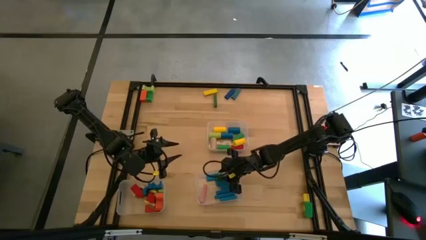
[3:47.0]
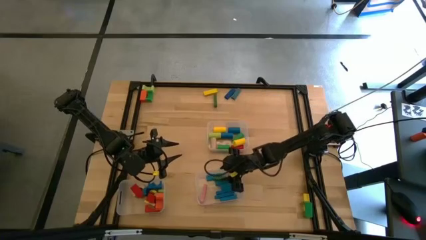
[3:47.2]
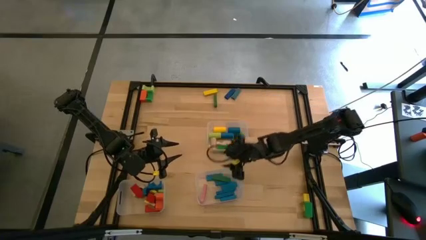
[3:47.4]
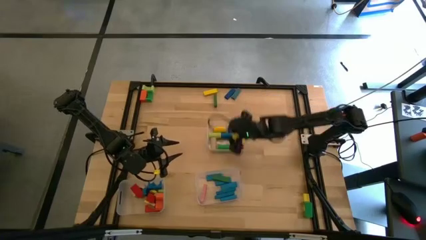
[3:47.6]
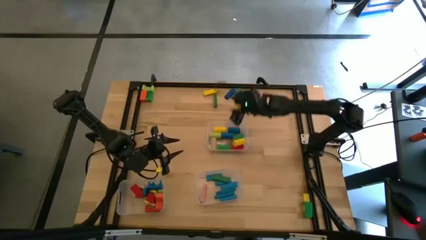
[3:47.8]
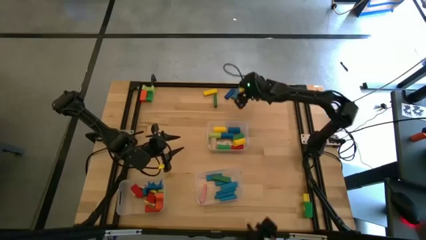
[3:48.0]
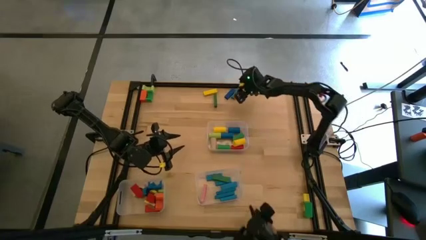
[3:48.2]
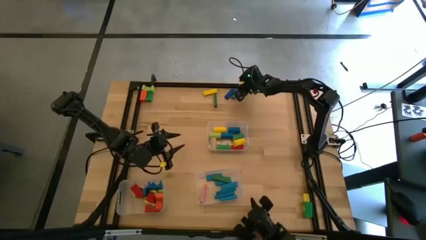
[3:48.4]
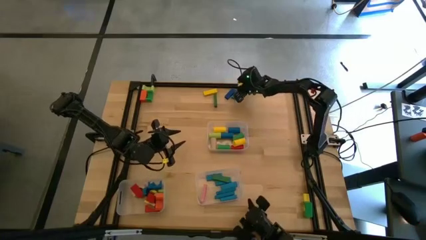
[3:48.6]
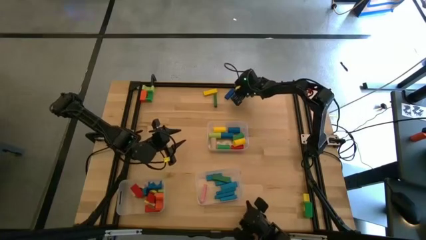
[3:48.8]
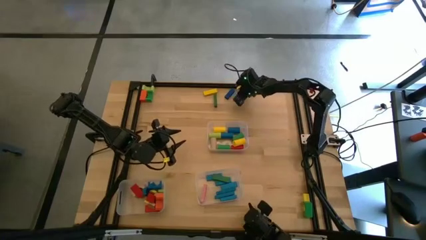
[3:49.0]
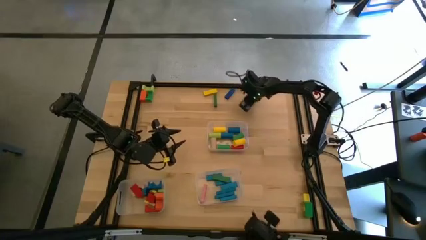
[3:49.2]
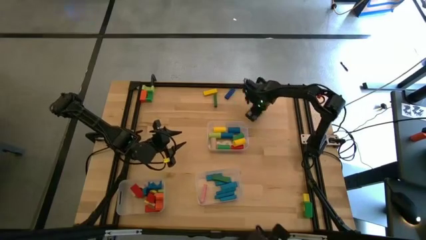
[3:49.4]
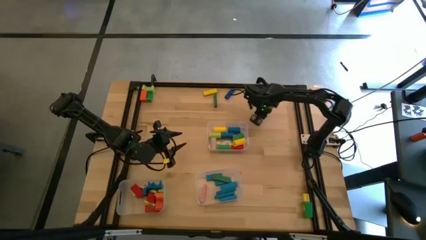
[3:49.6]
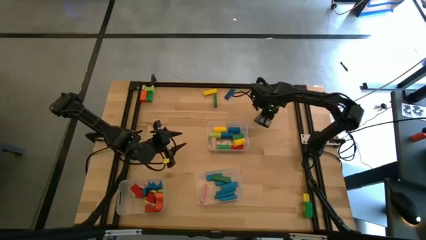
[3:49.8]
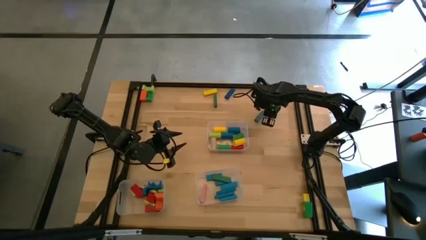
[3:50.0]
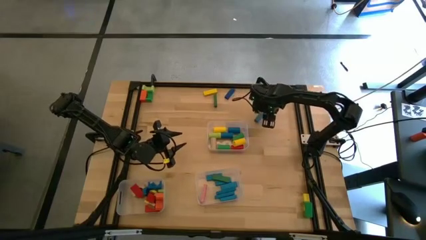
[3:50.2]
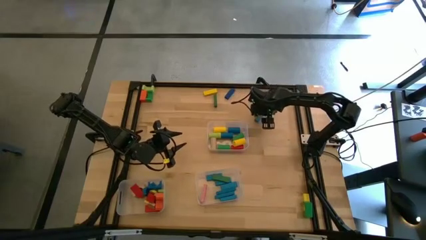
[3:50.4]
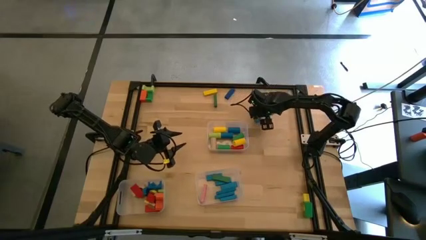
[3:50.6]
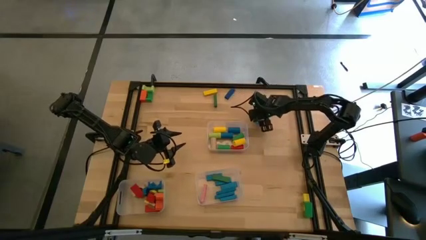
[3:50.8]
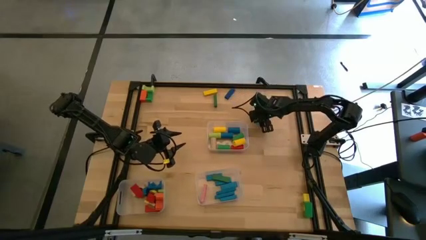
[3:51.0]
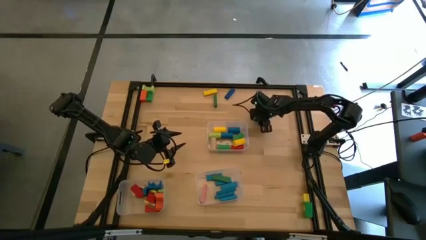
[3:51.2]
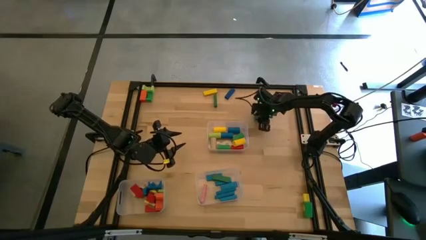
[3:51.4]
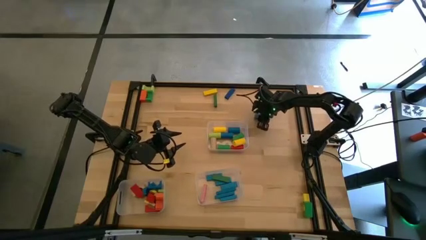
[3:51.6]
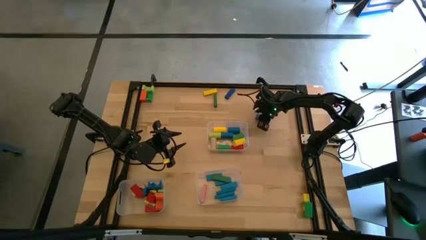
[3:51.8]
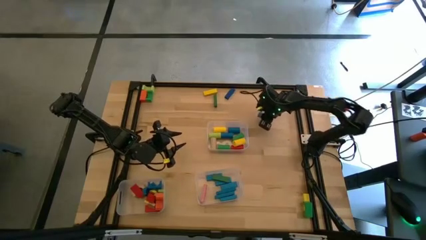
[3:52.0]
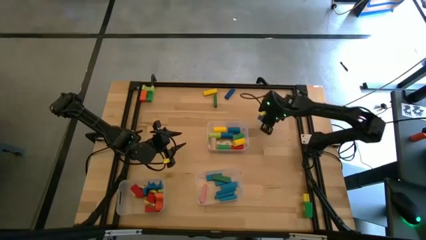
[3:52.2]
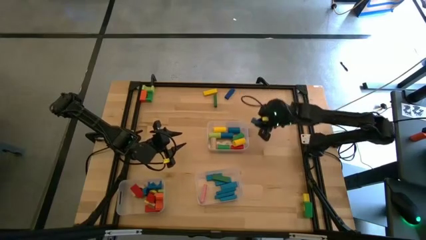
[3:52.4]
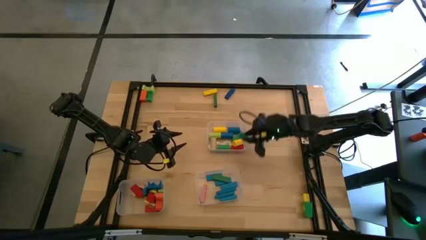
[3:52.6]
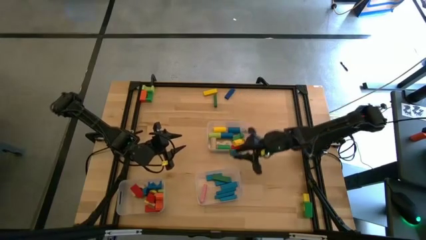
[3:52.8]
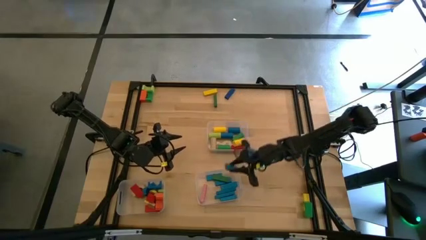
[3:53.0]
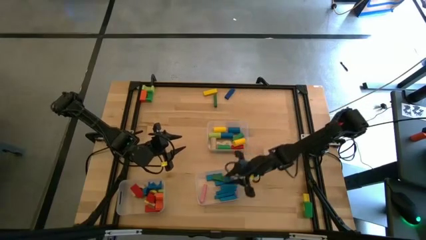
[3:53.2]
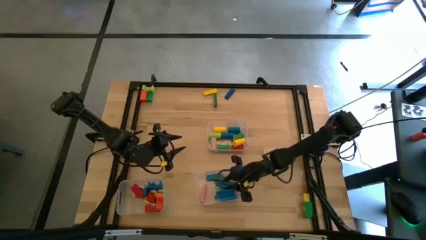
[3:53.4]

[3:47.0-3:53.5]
Task: Sort blocks by size
Put the blue rectangular block into the bottom right transparent bin

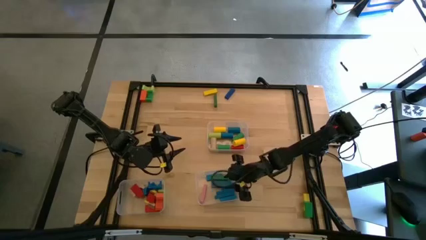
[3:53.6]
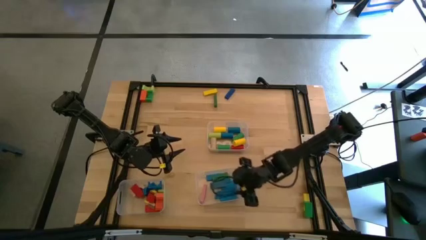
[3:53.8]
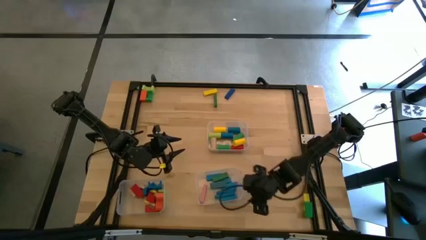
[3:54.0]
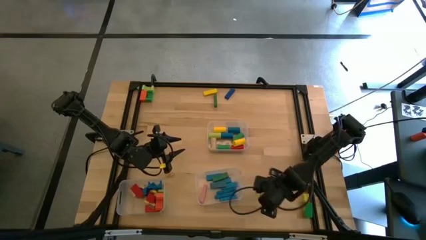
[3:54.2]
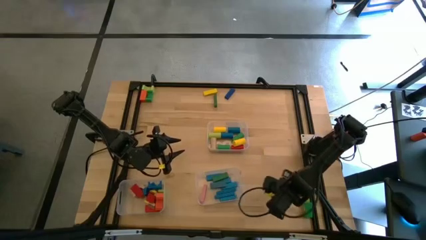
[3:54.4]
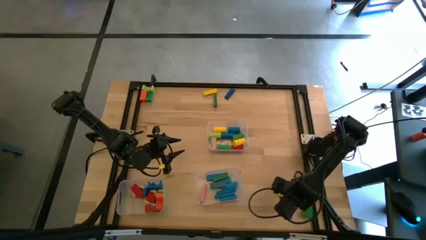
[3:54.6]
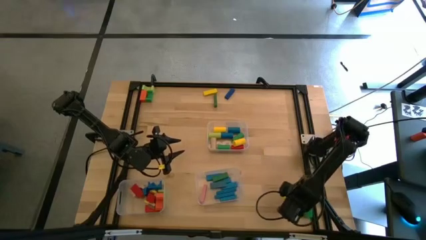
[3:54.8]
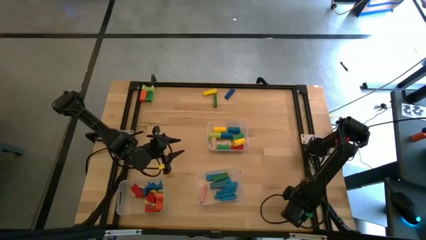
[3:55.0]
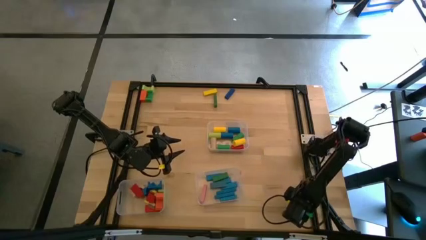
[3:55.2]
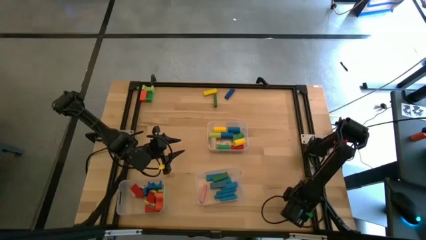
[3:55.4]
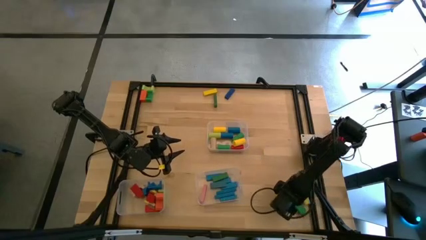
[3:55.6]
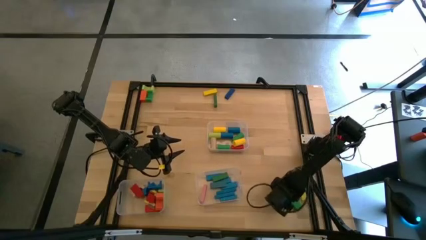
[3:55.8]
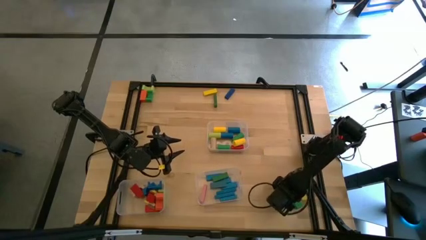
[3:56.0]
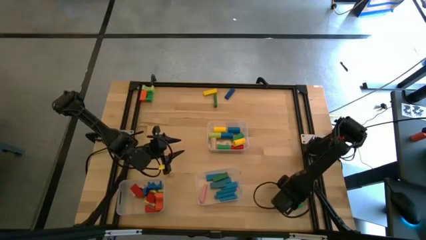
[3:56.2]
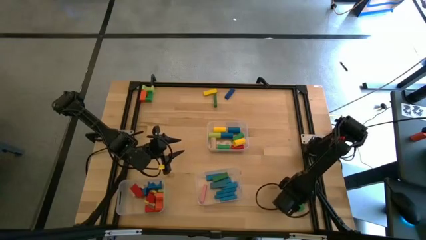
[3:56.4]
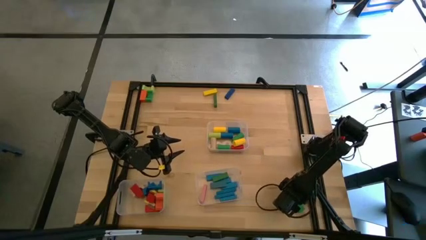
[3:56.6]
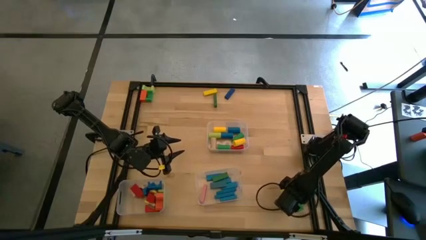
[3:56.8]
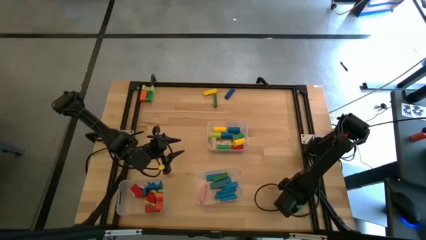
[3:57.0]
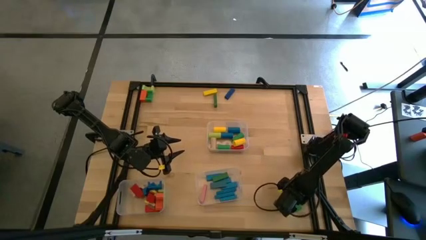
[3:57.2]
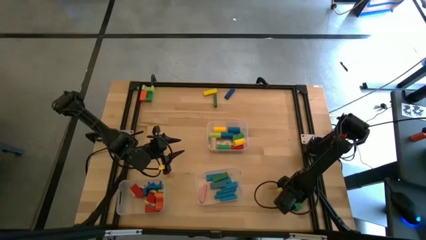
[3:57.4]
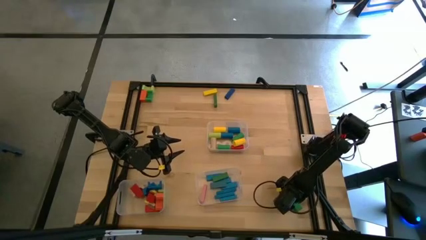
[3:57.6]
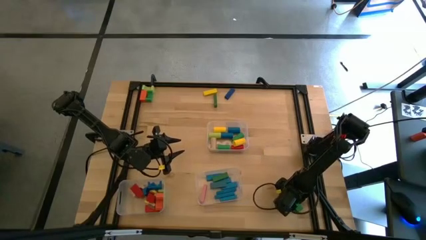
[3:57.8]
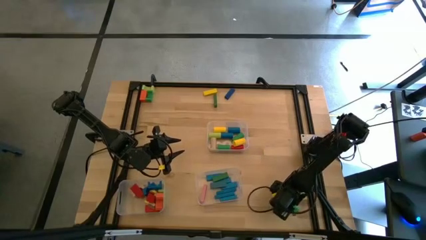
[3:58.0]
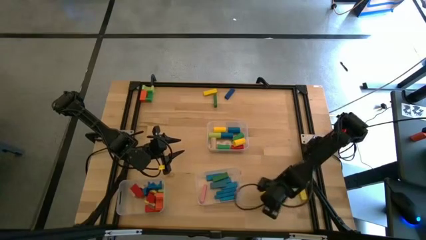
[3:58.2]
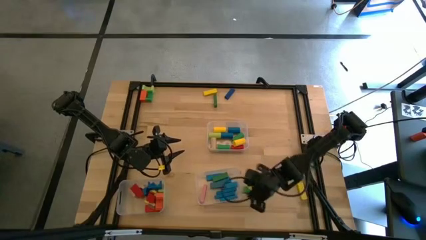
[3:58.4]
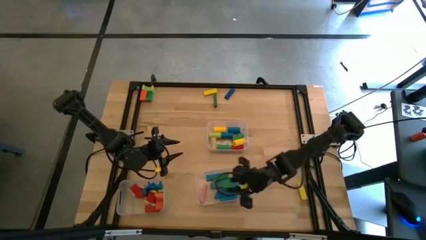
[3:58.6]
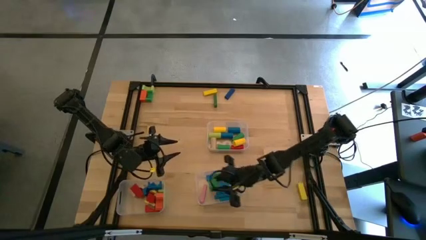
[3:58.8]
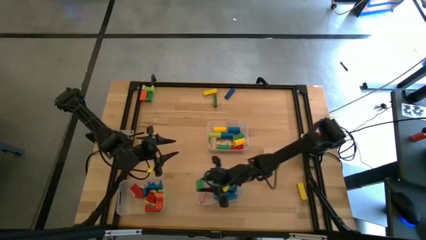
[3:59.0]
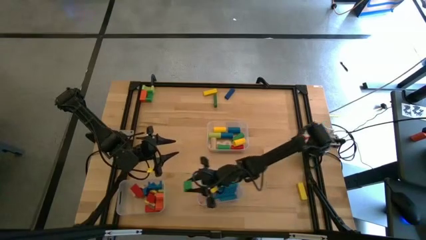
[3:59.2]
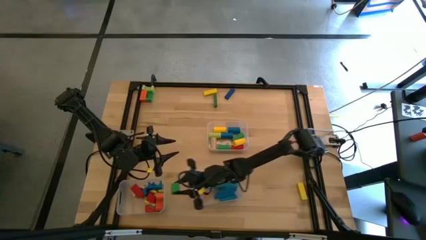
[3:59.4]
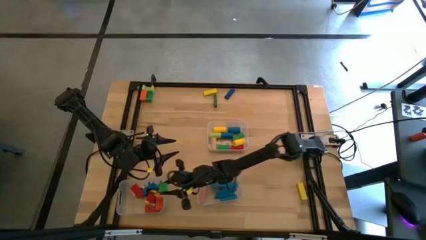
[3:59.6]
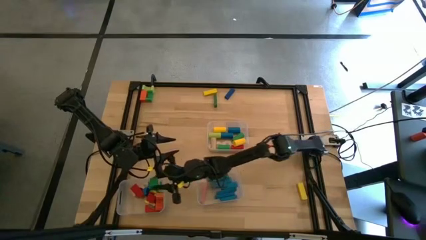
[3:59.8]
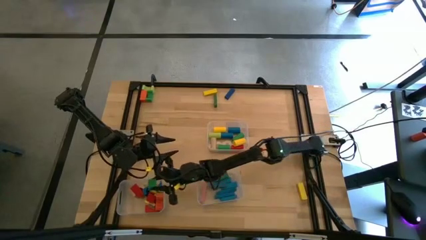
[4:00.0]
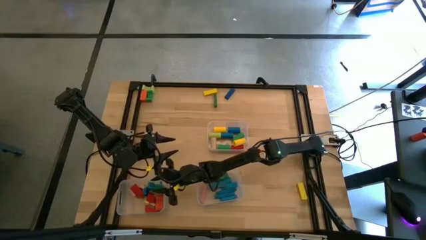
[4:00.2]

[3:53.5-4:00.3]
Put the green arch block into the bottom left transparent bin

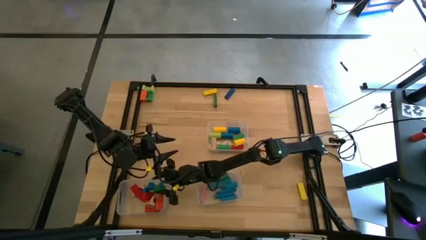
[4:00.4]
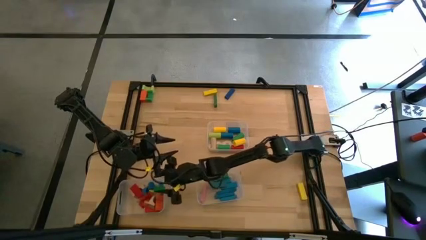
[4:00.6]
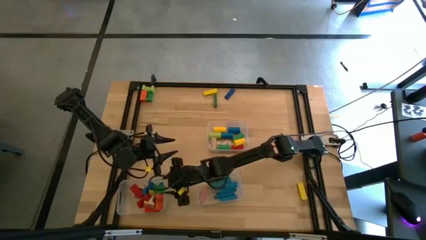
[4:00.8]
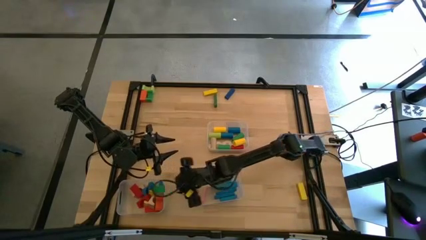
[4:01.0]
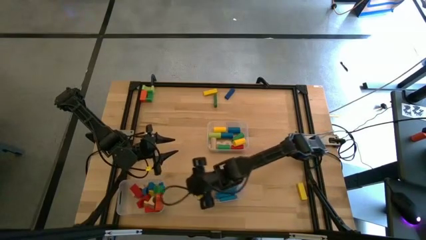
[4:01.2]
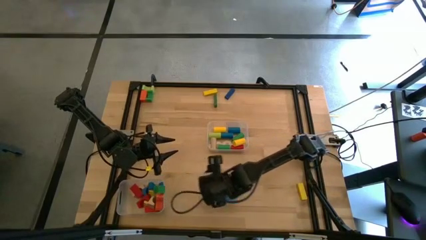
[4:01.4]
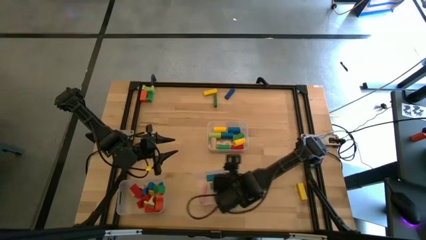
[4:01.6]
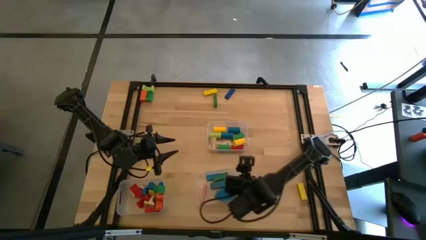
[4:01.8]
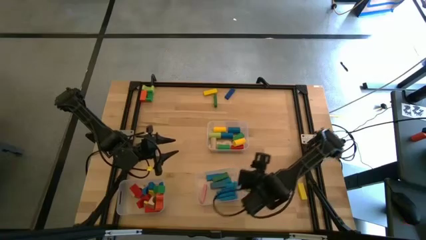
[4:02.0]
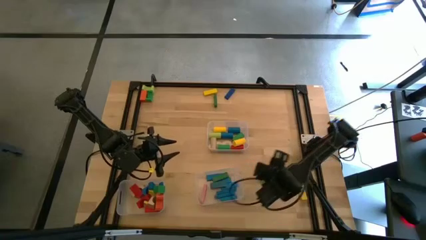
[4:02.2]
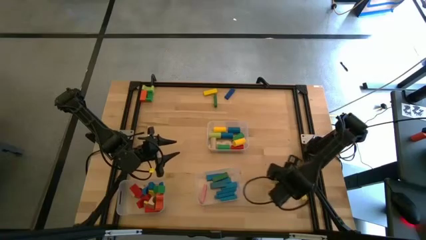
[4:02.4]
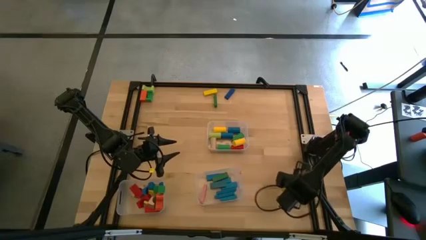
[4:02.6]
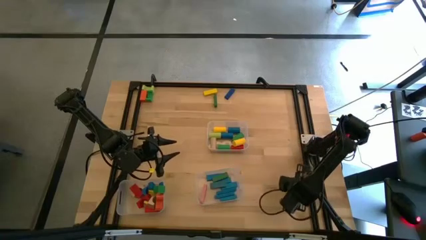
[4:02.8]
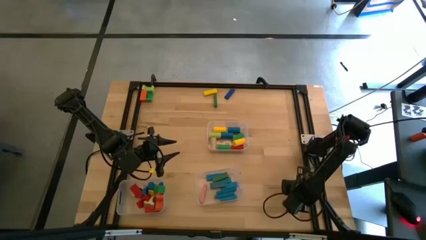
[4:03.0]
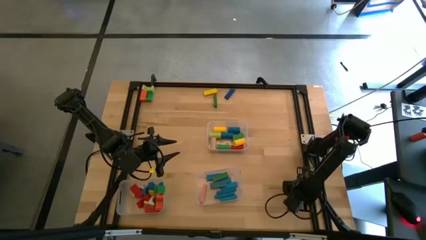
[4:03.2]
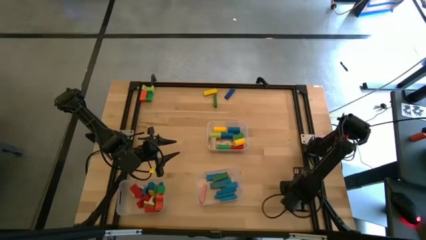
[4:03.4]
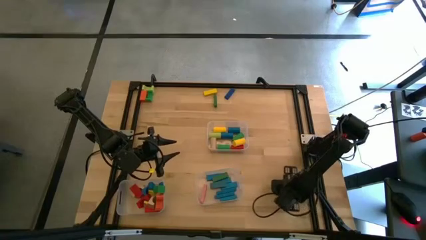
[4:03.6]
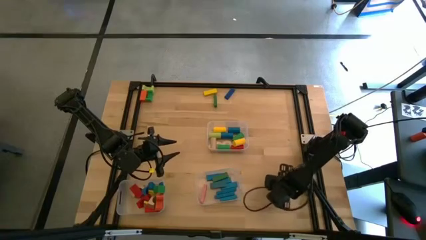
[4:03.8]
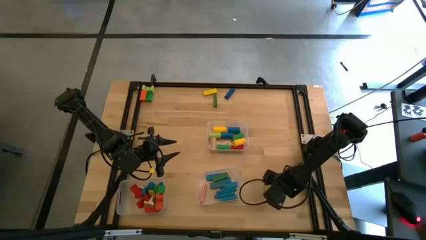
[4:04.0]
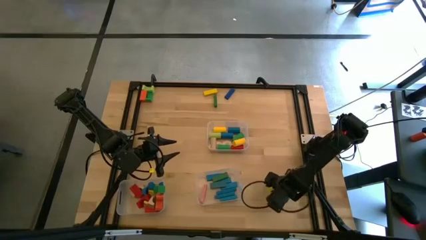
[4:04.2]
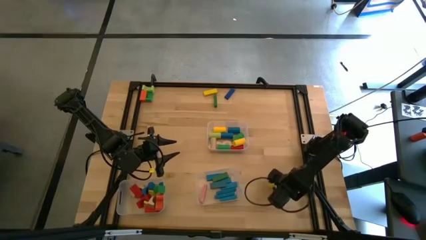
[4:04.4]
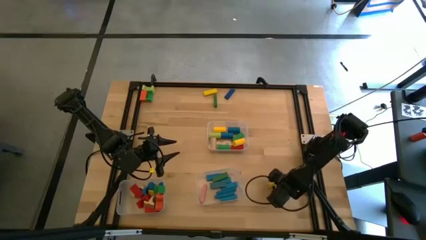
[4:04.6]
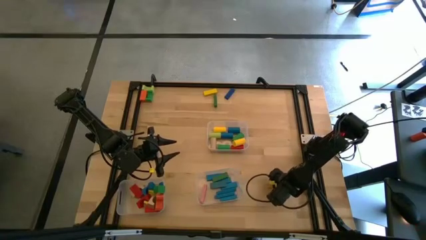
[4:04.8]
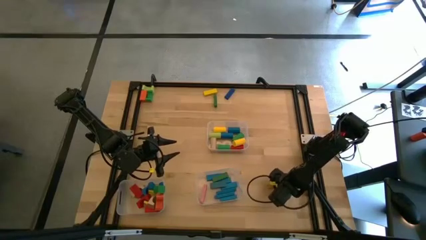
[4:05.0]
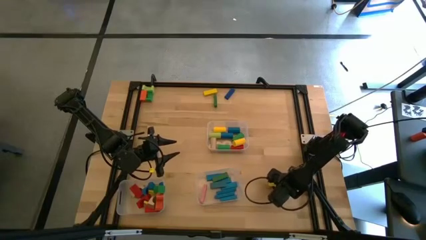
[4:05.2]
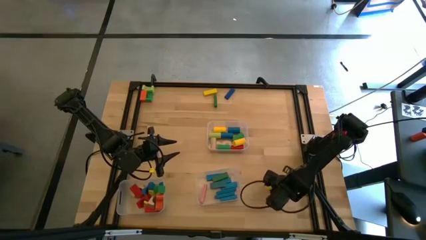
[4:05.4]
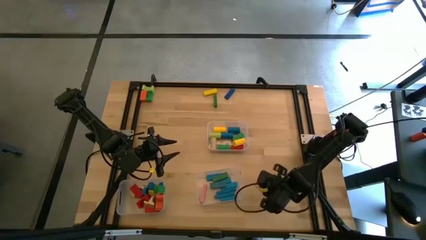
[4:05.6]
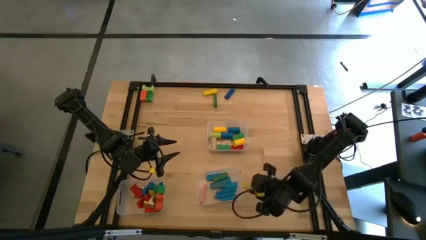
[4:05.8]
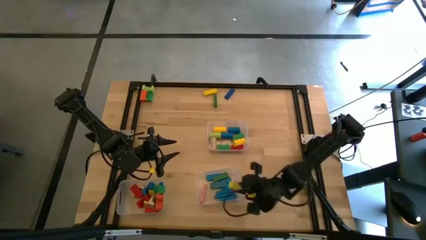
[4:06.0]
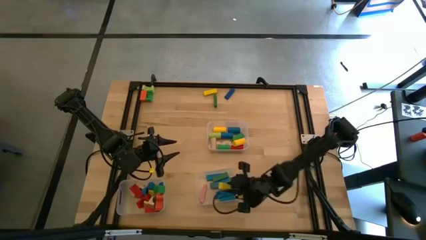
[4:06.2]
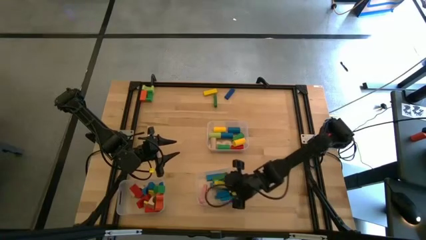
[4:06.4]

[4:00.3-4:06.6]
Put the yellow rectangular block into the bottom right transparent bin
